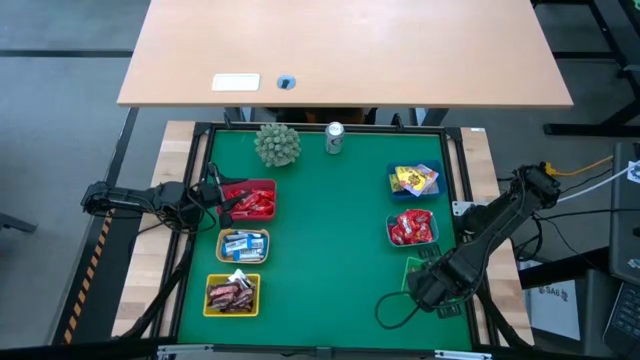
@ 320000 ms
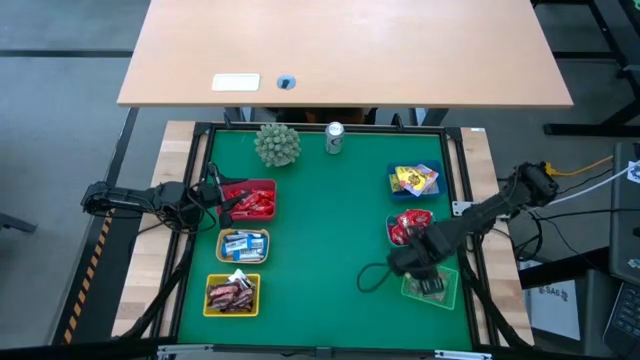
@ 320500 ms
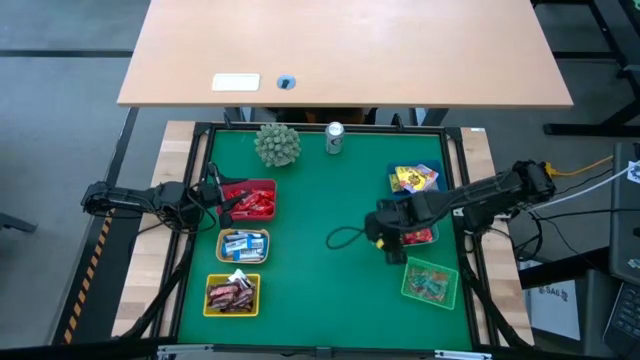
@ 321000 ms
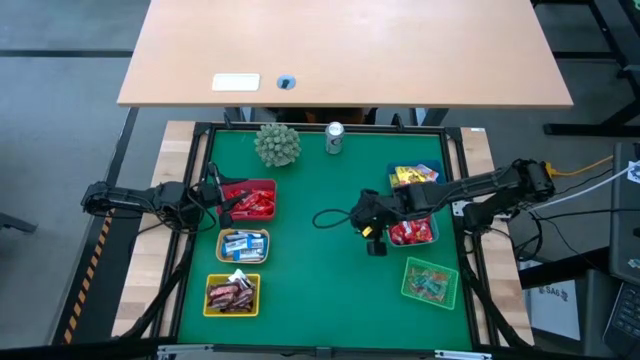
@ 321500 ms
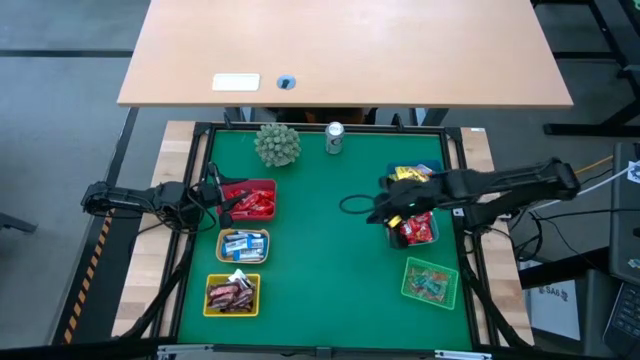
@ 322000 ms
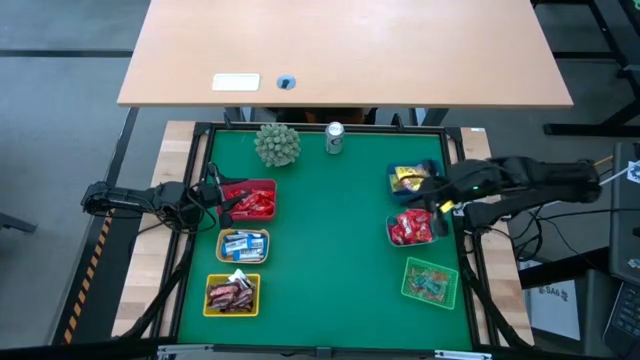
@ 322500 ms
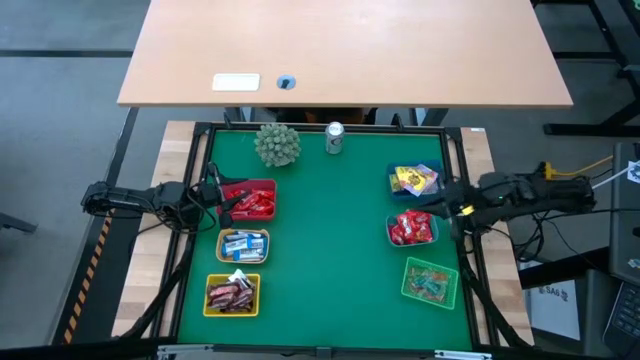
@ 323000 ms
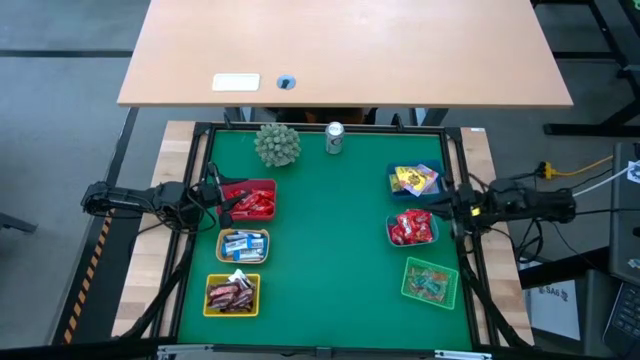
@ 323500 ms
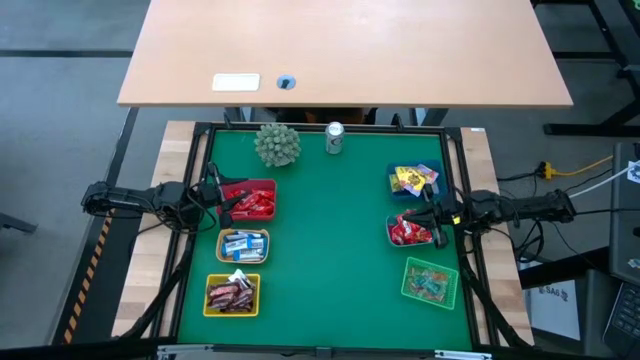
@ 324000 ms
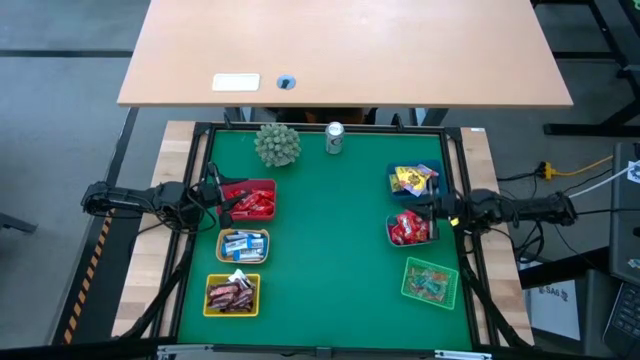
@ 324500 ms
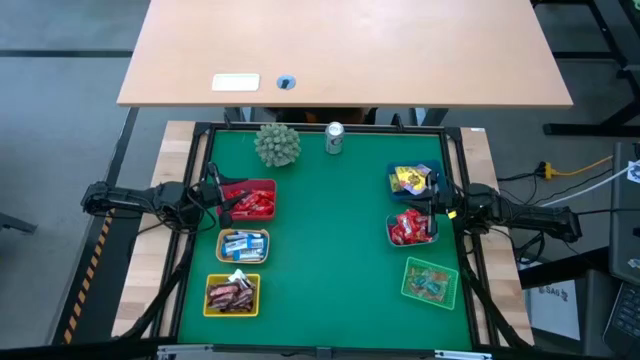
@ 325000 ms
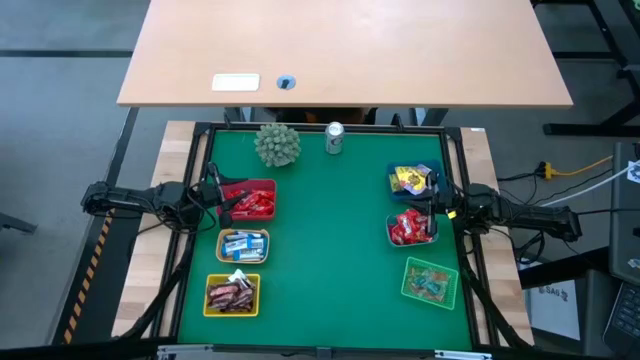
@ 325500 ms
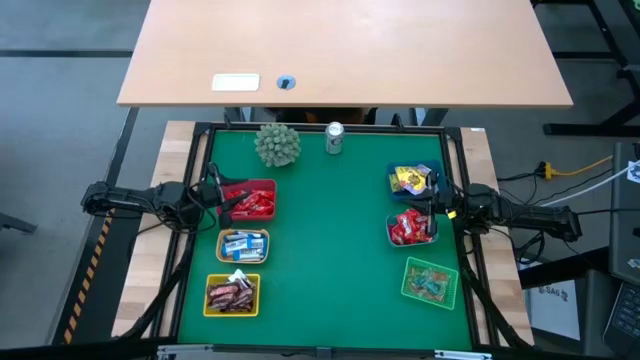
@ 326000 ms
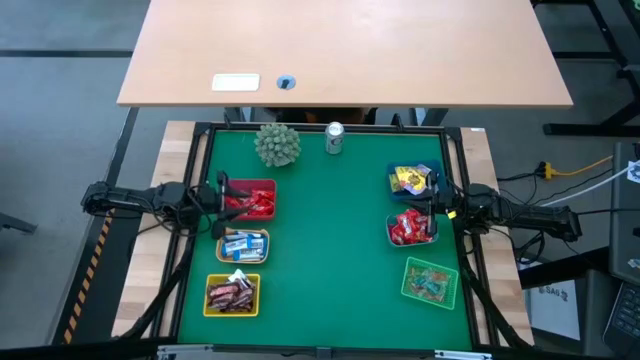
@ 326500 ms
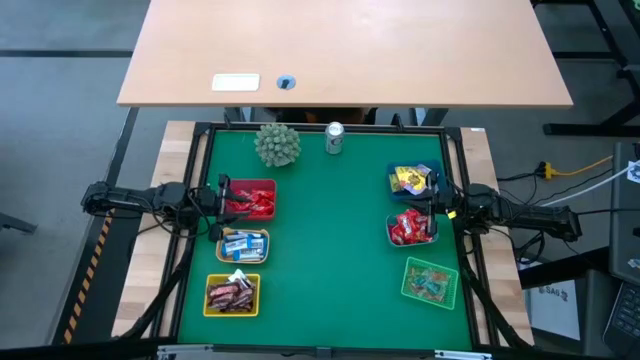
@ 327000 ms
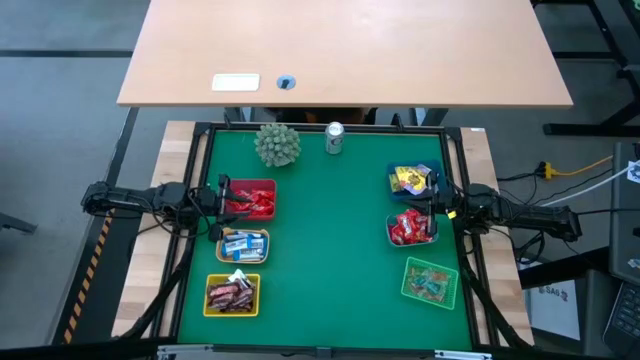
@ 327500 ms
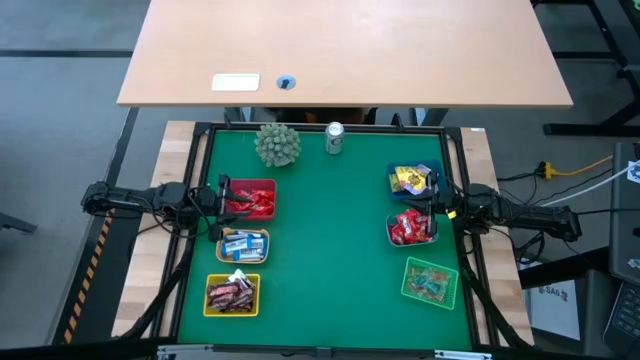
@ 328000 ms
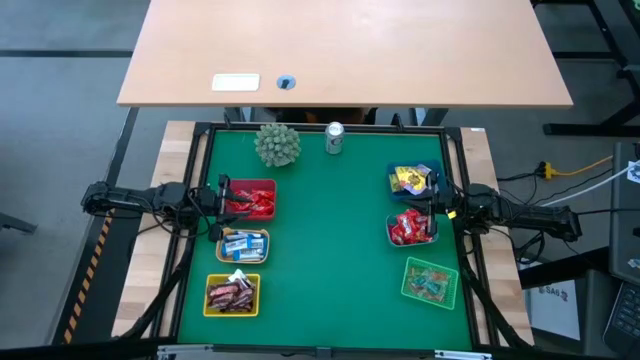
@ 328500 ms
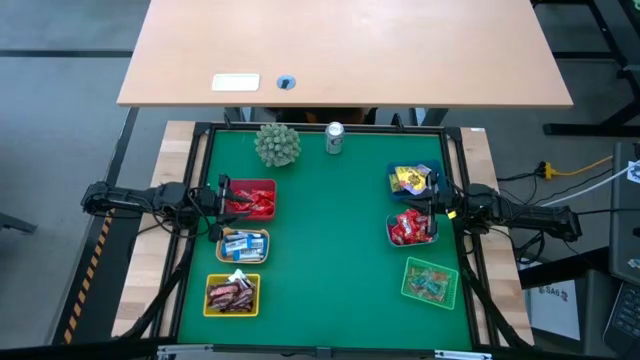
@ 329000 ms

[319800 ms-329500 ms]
Task: Sort candy
Return to Home Position

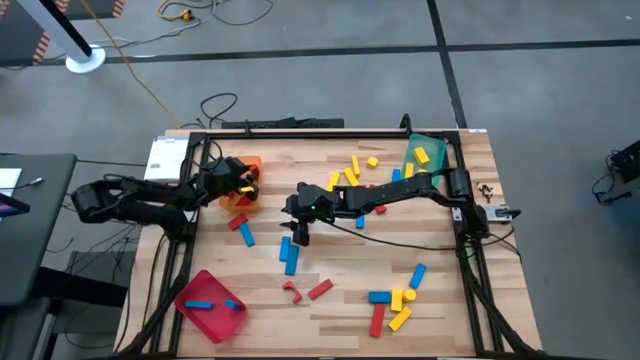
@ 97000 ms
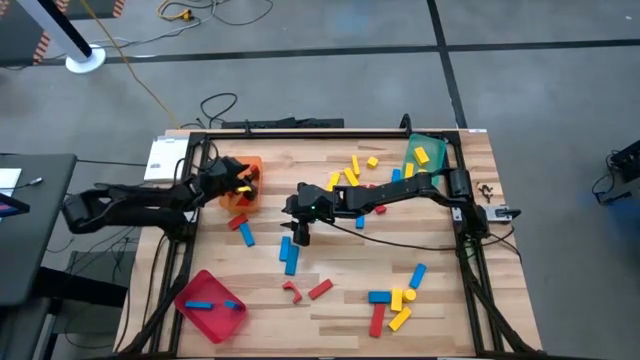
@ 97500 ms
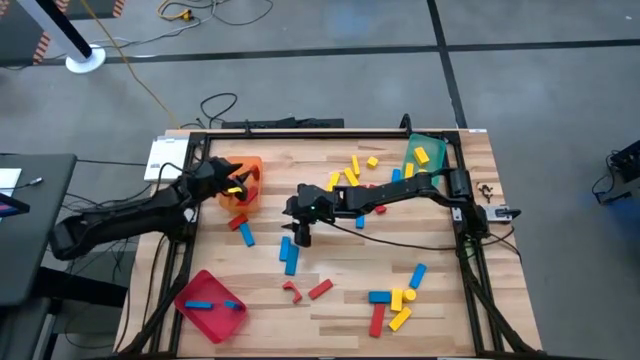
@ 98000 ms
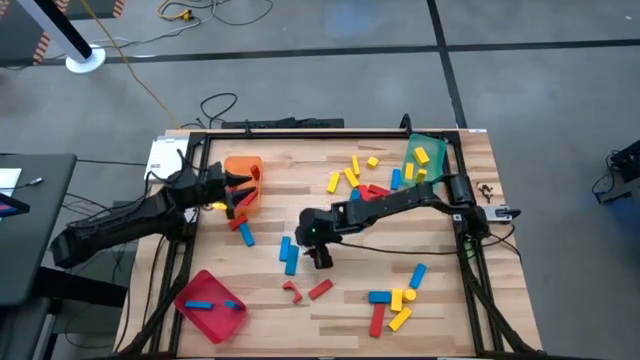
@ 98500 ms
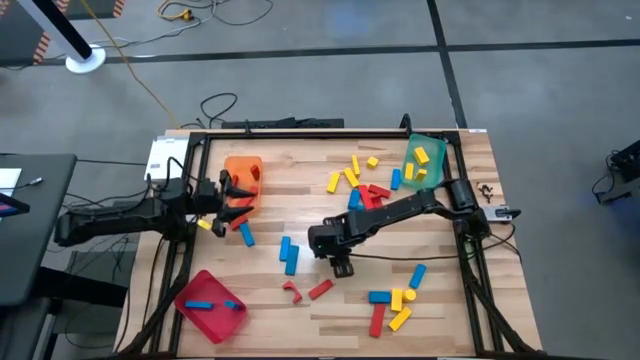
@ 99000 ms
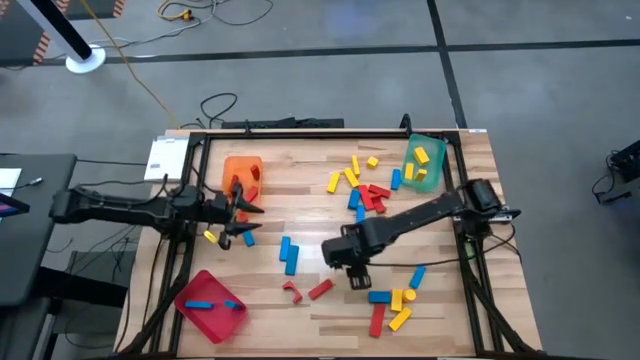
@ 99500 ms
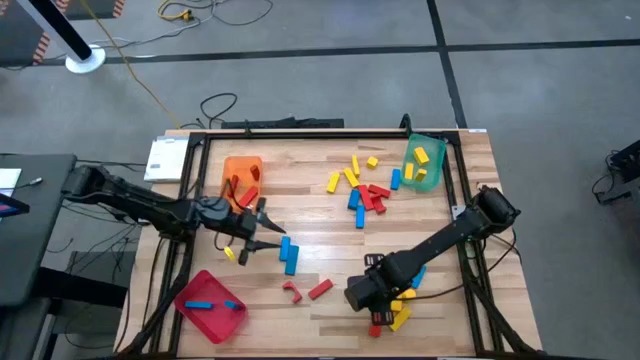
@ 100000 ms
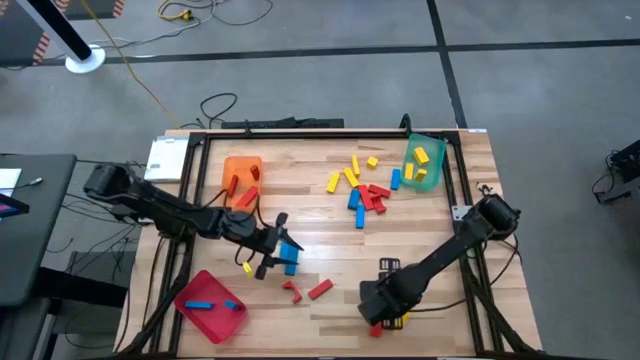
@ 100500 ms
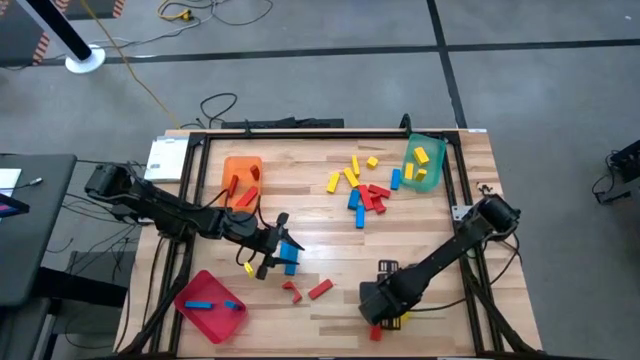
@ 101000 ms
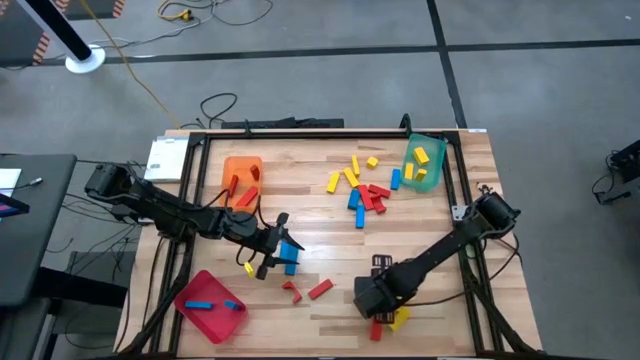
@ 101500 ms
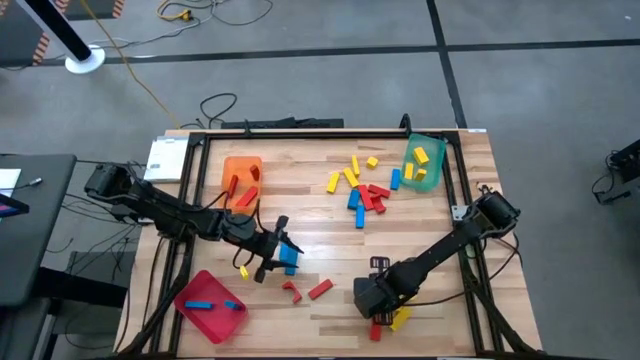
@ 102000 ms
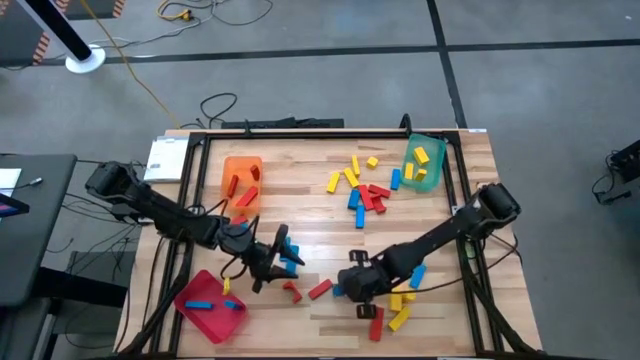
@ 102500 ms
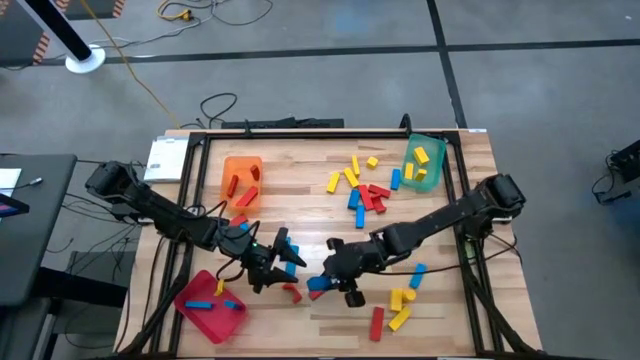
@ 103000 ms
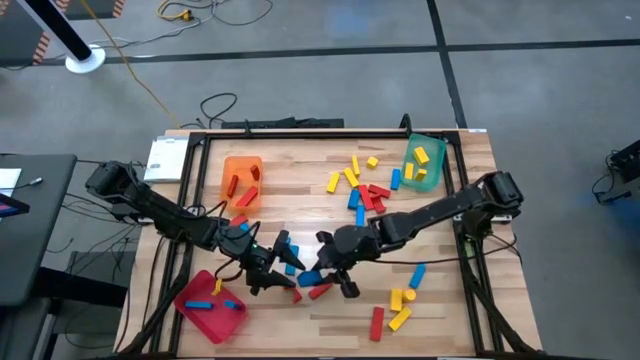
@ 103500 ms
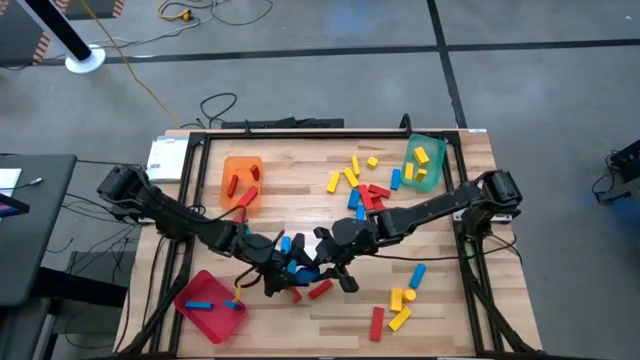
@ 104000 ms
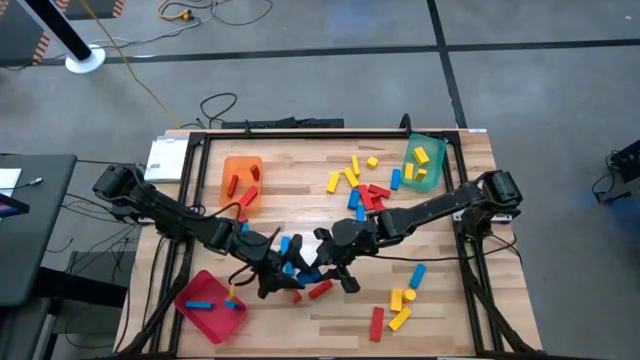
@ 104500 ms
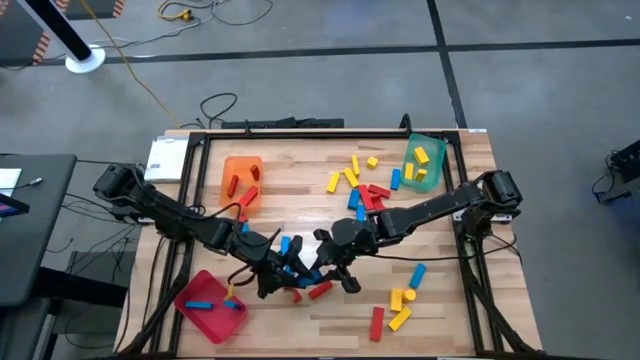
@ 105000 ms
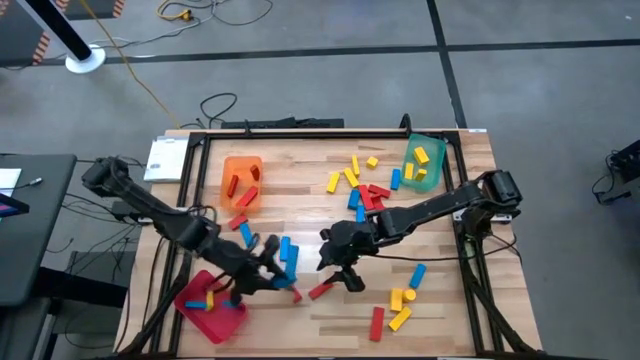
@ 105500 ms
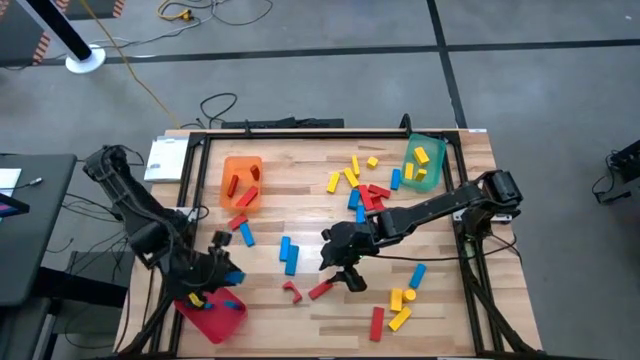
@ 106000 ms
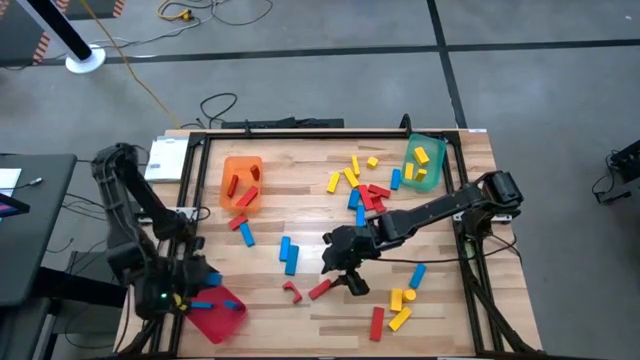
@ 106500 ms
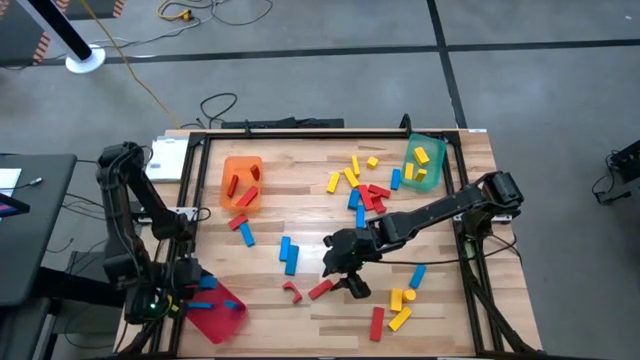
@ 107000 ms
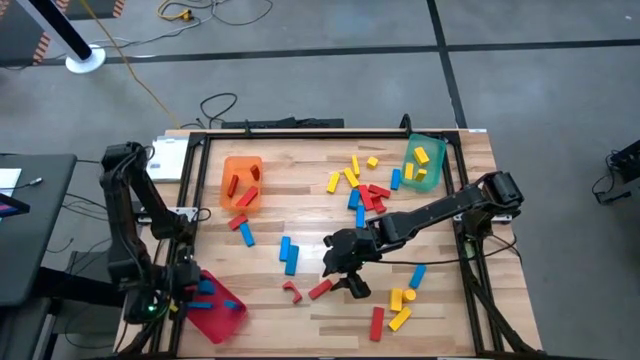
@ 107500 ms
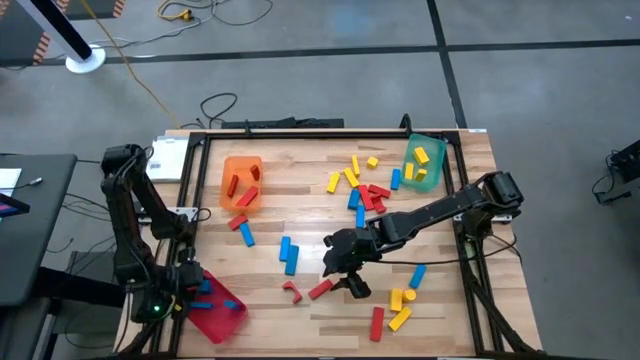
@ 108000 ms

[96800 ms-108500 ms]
Task: Sort blocks
Put the blue wooden block into the red bin

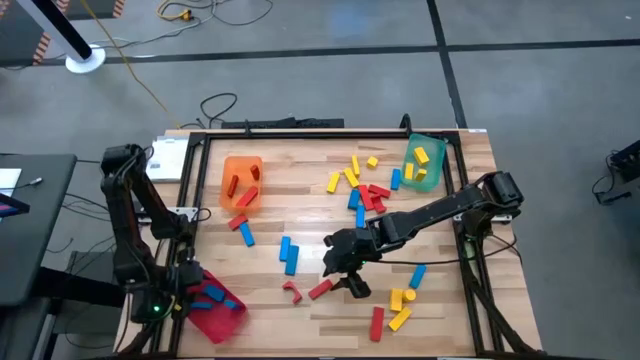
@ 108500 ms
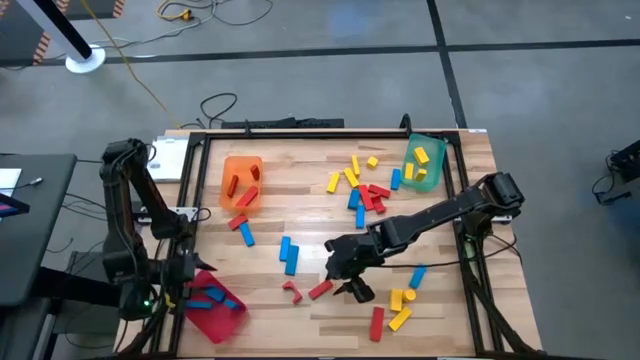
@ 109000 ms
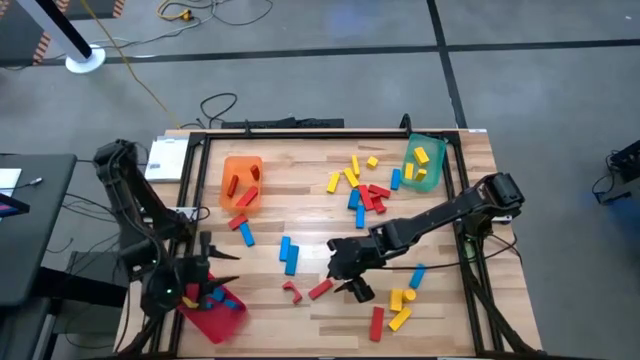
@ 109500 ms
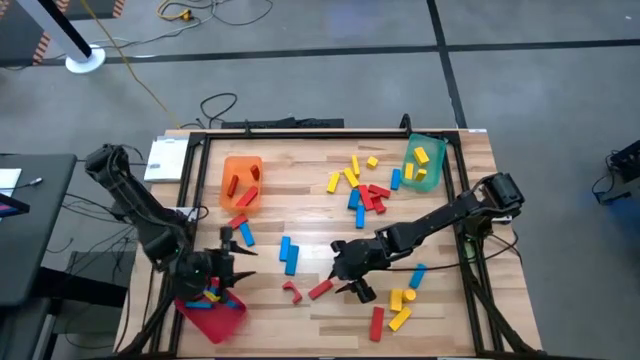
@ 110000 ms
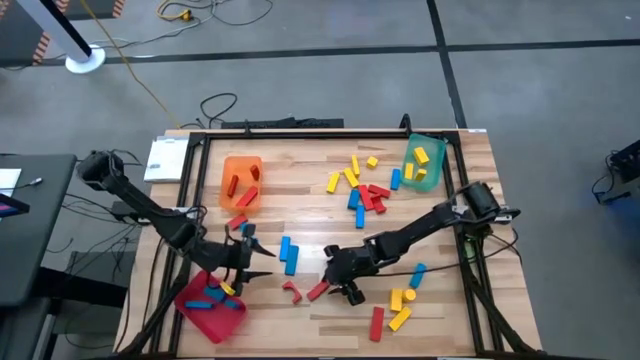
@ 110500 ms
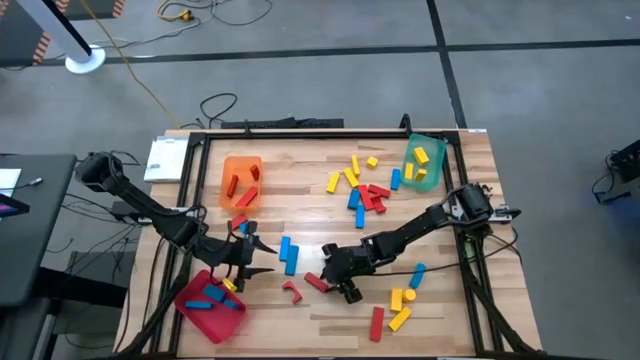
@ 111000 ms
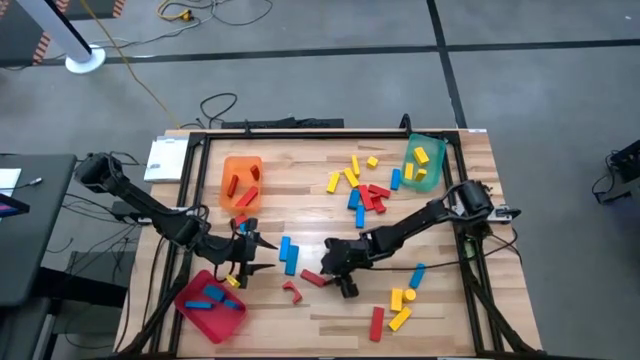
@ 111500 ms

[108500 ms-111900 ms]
Put the red wooden block into the orange bin
